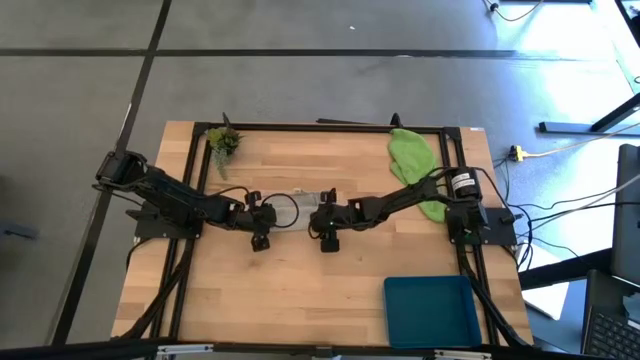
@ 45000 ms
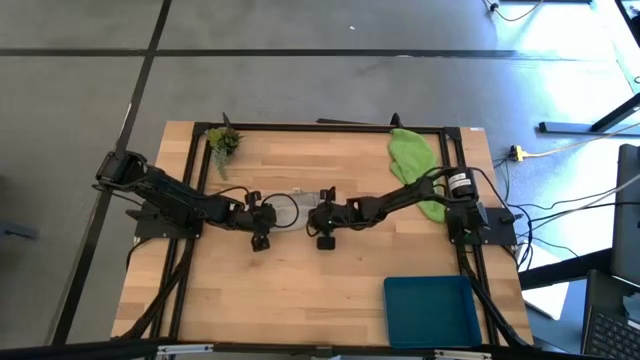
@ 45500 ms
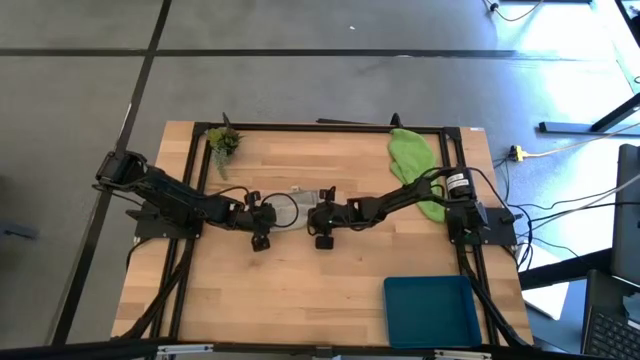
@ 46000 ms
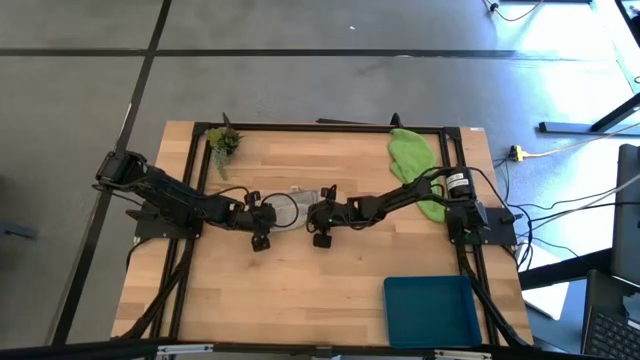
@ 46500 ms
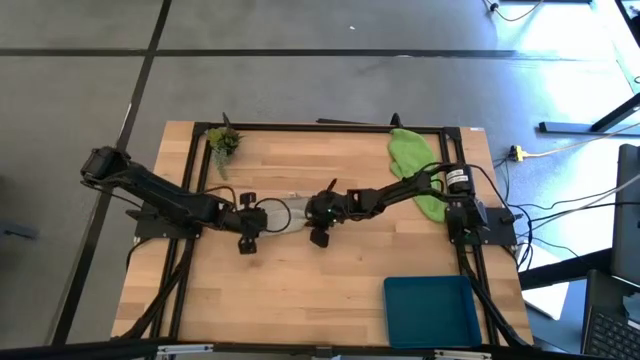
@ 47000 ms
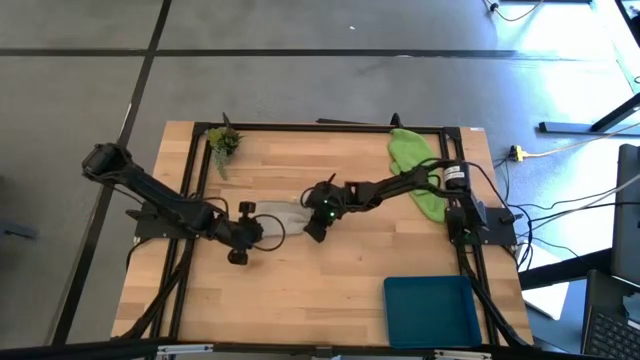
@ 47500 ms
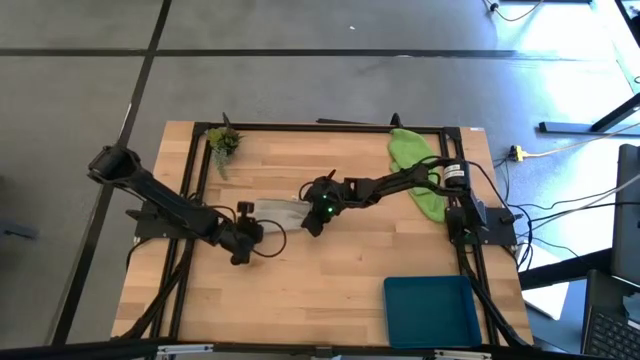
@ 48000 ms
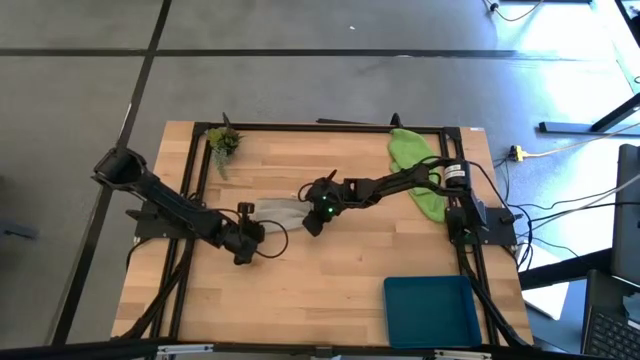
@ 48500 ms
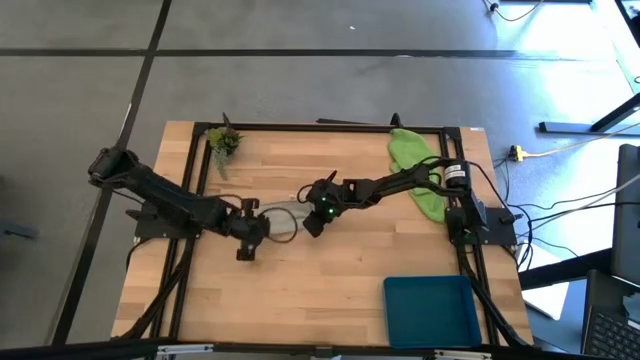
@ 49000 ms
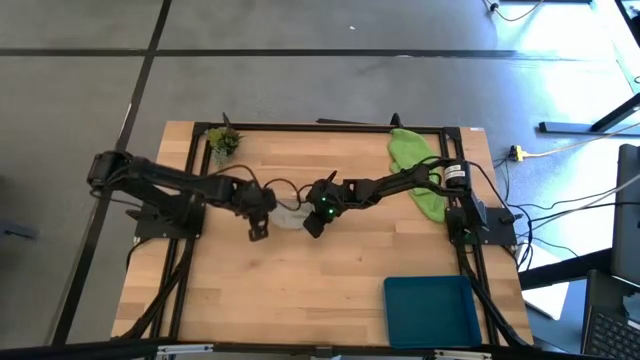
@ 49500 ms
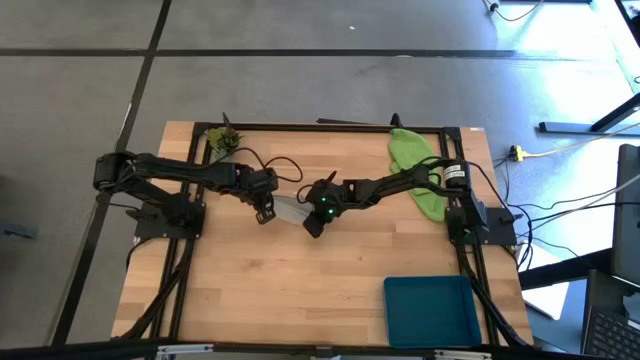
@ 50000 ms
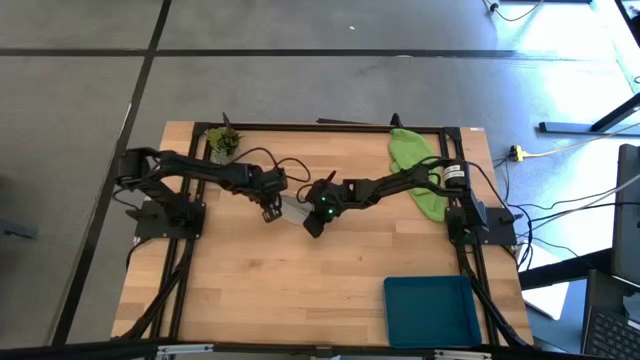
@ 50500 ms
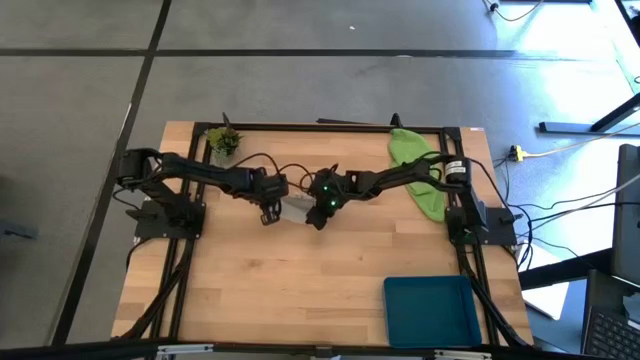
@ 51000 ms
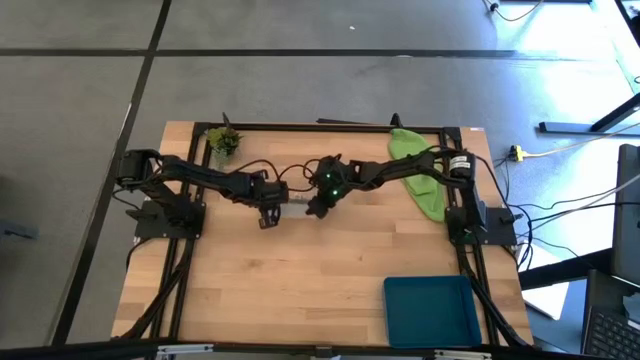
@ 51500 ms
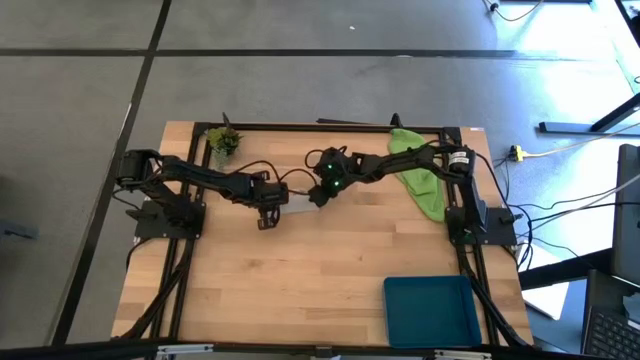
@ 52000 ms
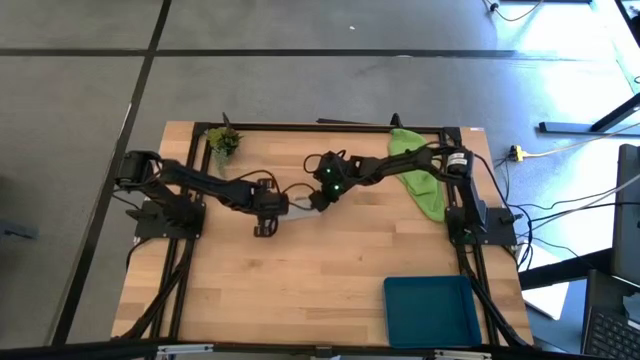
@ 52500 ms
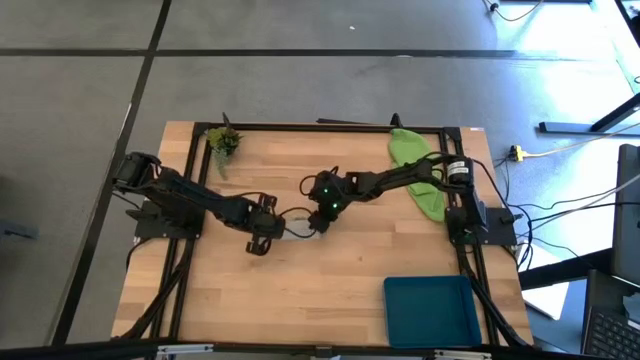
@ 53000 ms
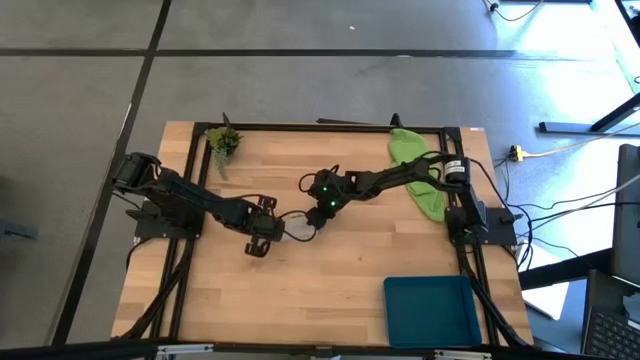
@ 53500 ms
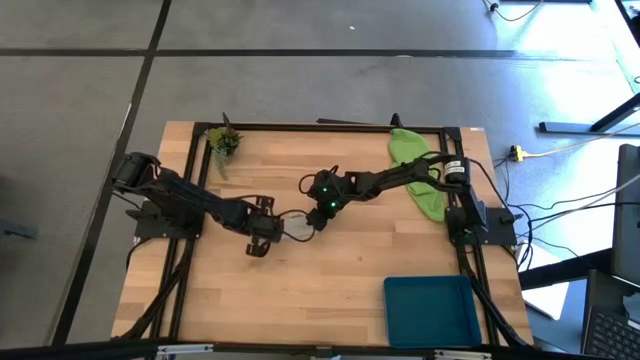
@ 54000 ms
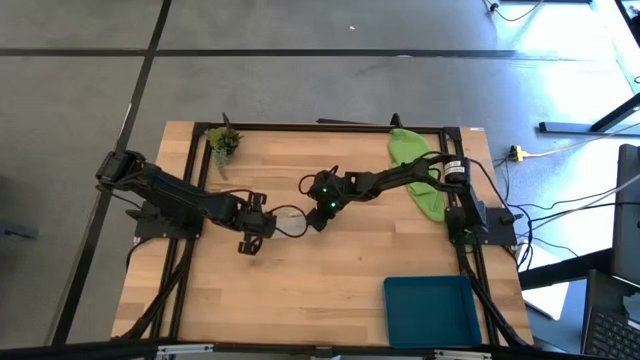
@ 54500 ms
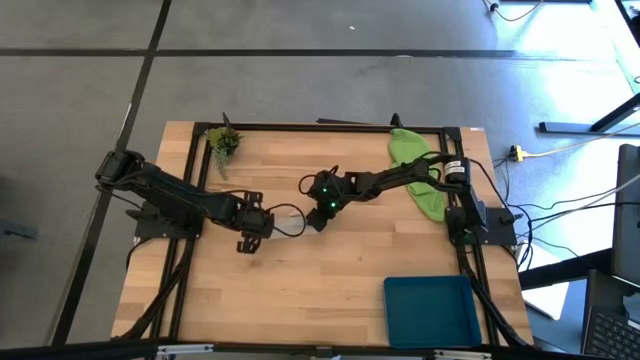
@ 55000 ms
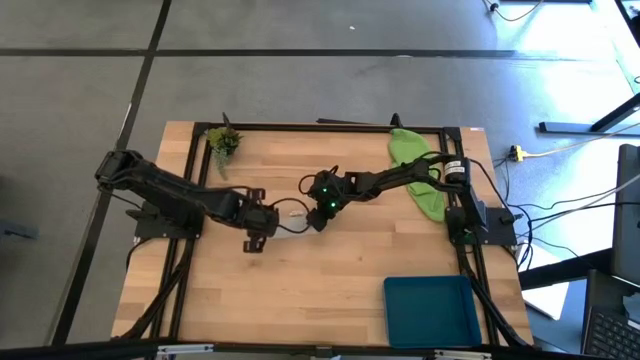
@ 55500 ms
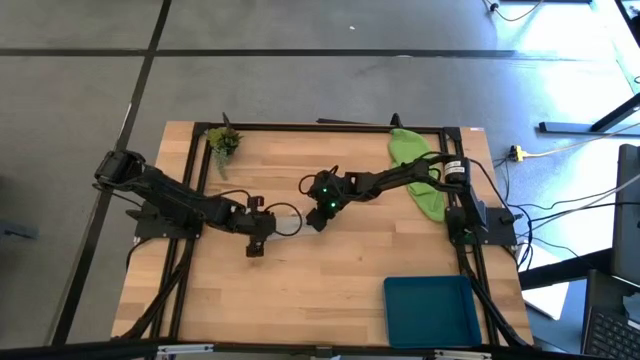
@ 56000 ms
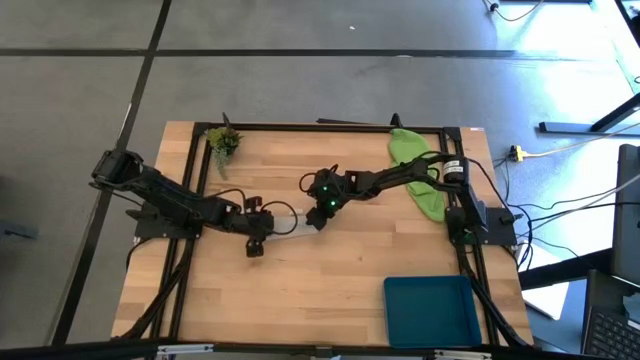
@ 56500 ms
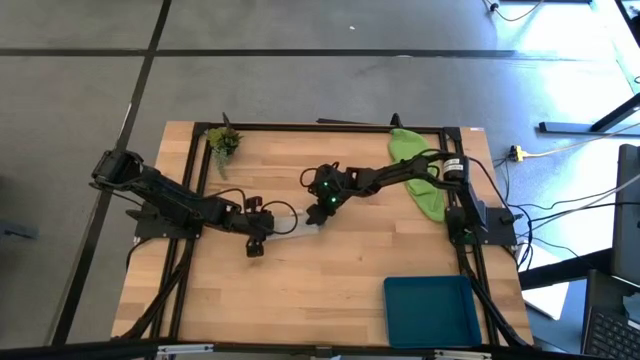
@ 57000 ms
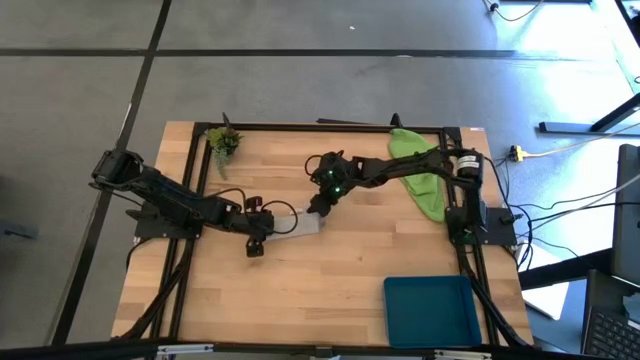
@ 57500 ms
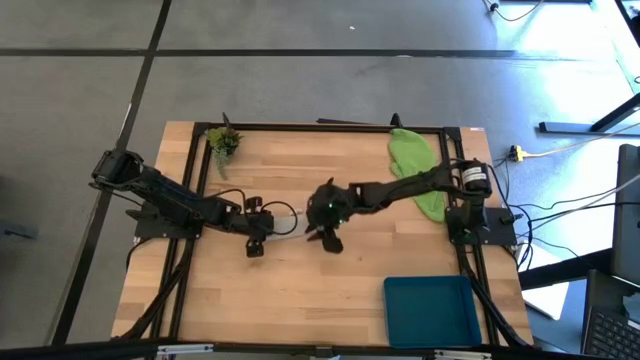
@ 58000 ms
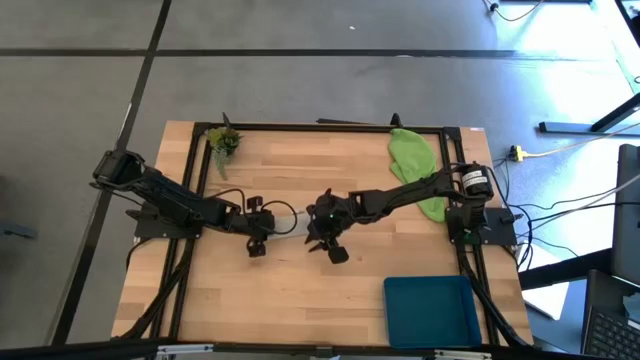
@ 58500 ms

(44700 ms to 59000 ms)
Task: Roll microfiber towels into tight, uniform cylinder then place into a basket
Roll the gray towel

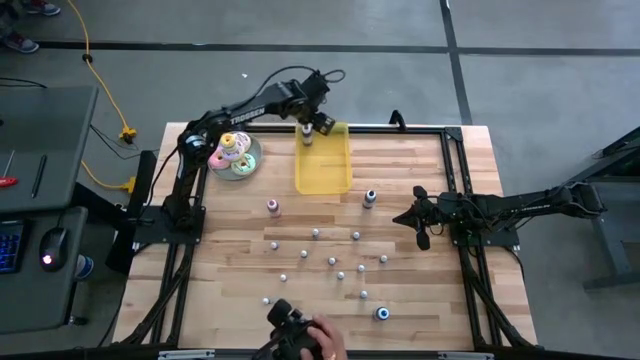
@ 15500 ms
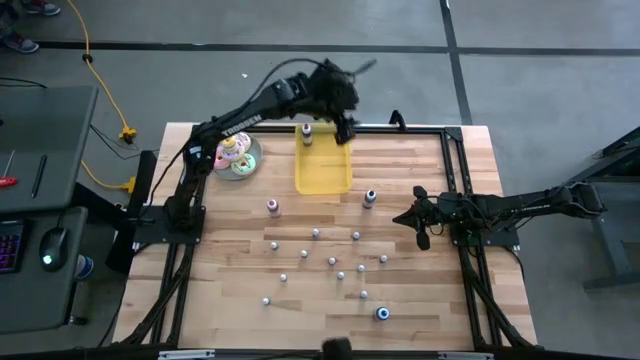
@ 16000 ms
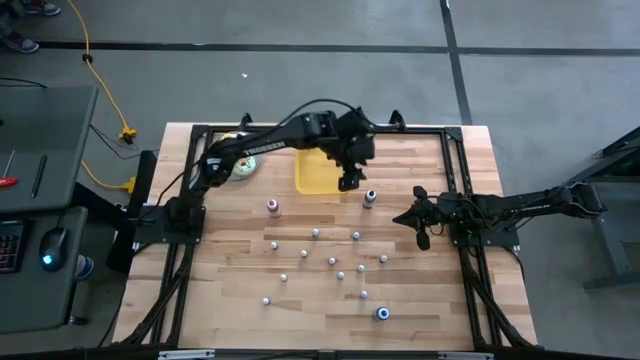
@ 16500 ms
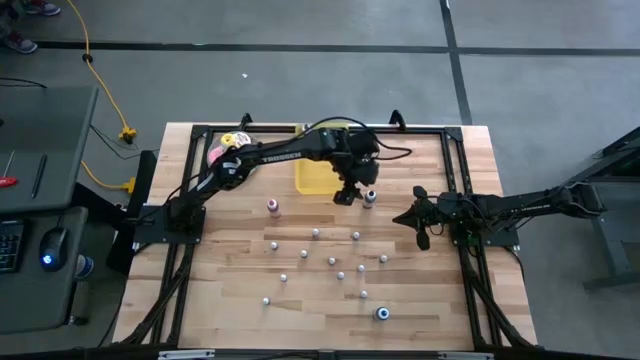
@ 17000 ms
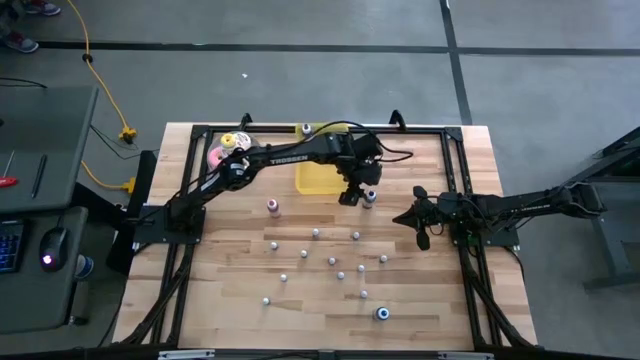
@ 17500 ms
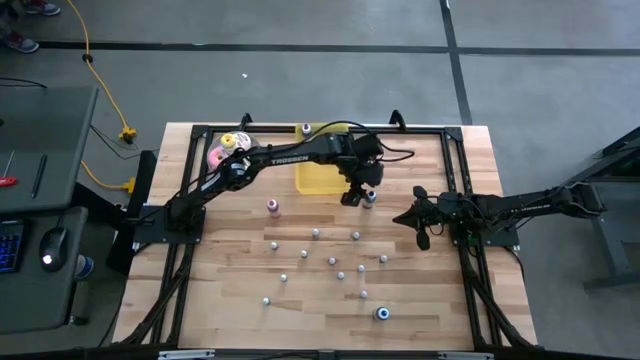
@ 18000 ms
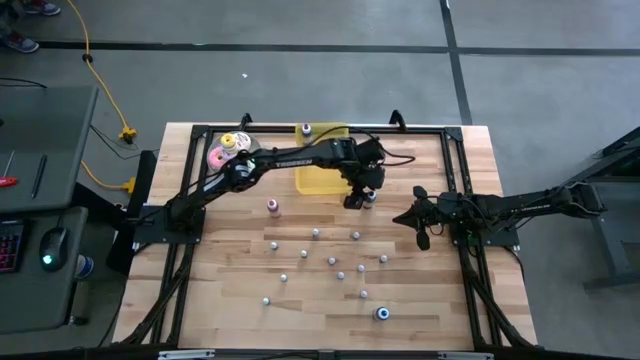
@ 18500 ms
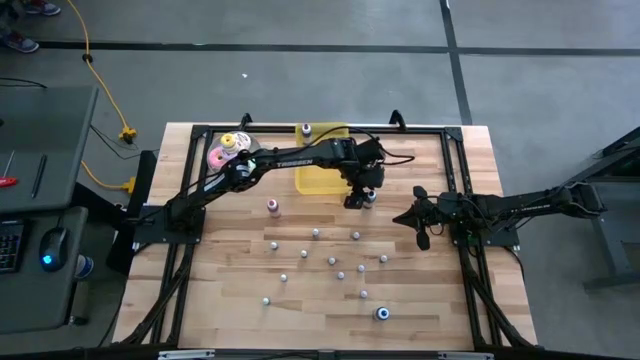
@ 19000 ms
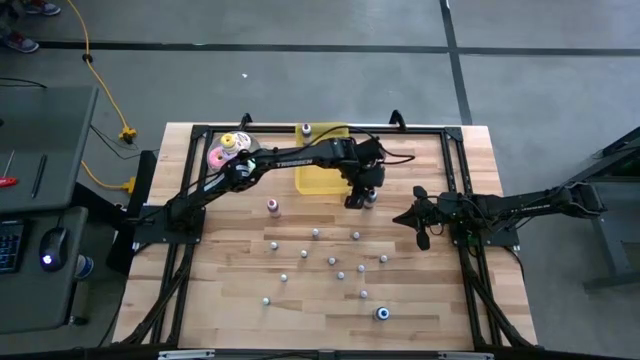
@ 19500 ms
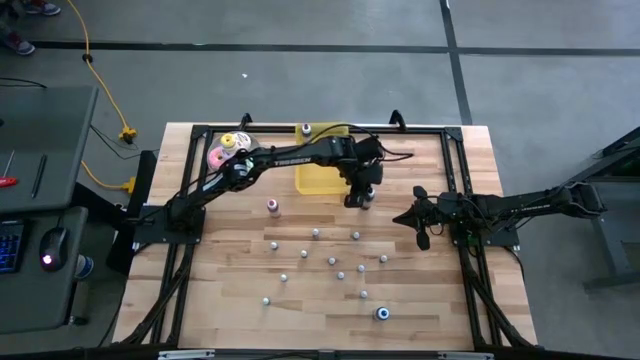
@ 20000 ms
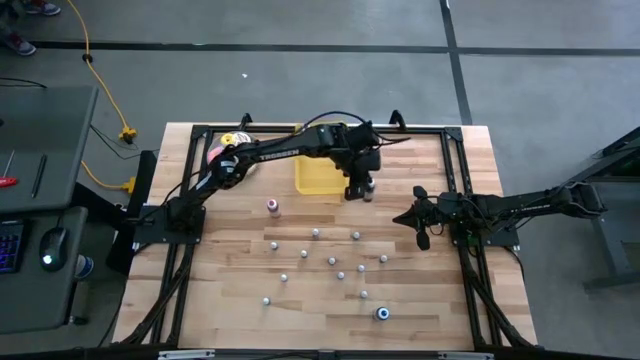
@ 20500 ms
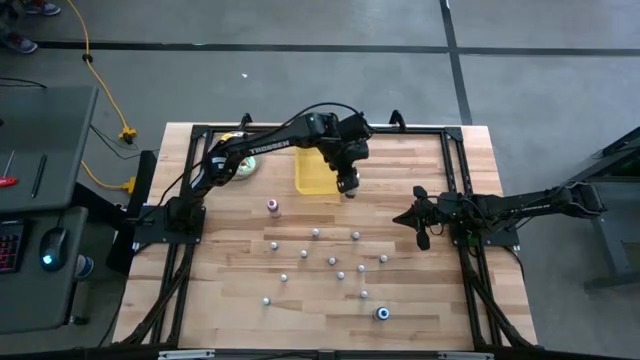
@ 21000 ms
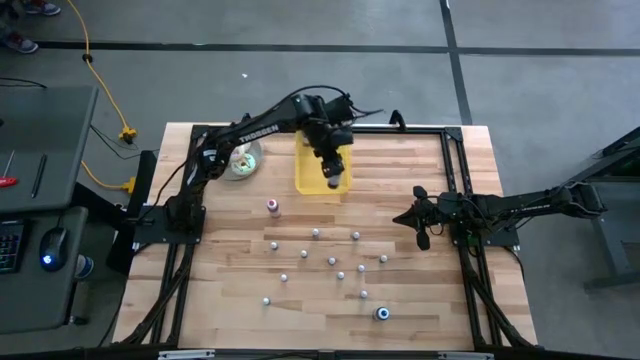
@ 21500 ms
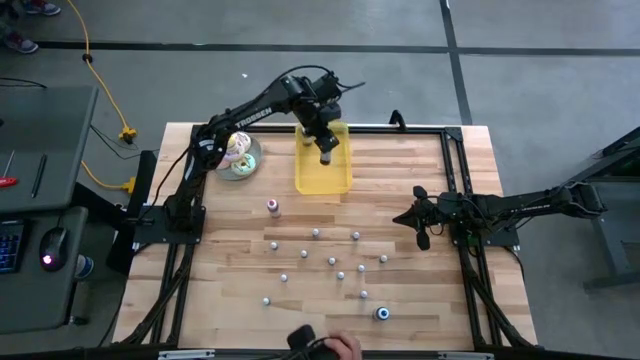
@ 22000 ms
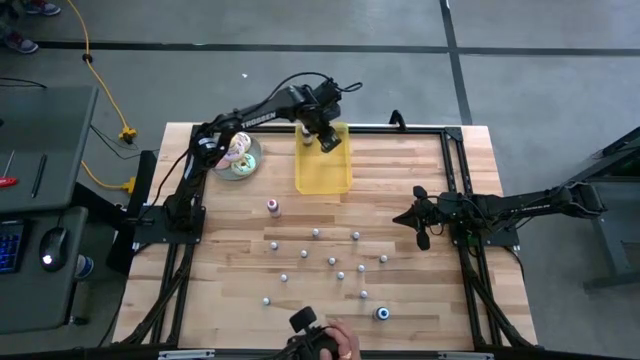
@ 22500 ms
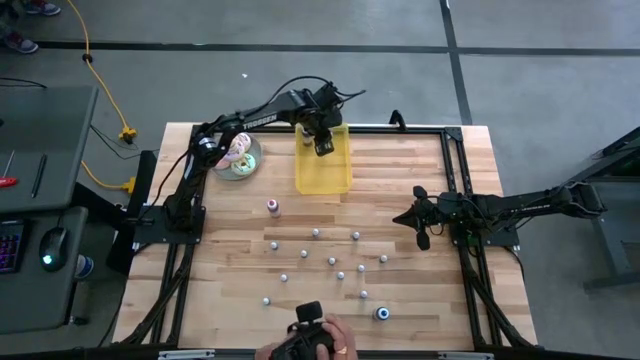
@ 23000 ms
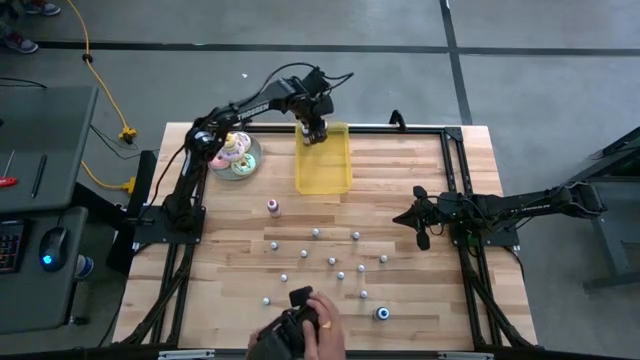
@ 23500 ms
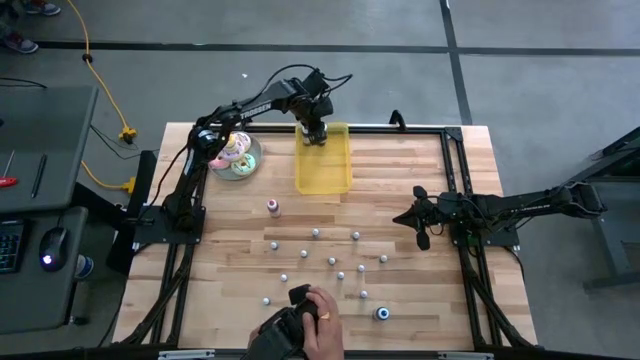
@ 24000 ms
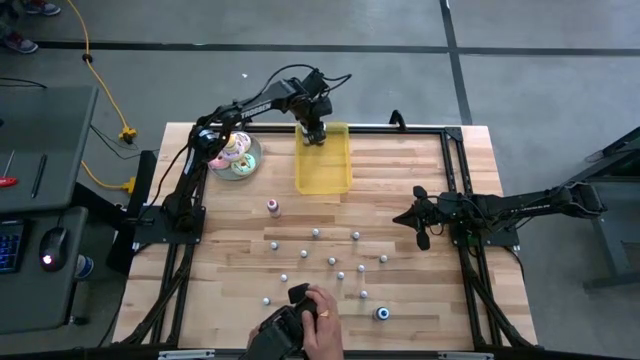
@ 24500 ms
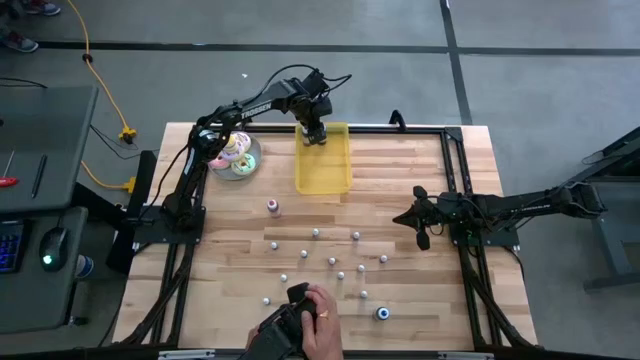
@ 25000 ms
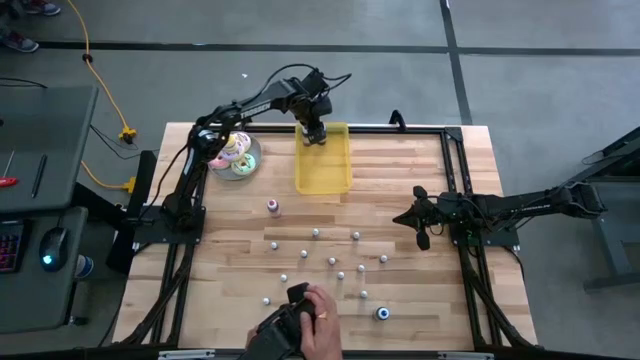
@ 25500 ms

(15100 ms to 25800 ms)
Task: Pick & Place food coloring
Put the large black food coloring bottle into the yellow bin
